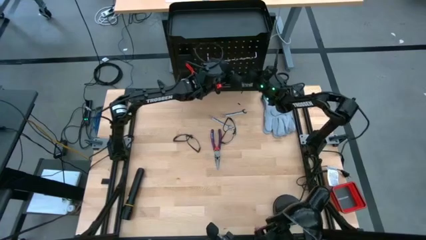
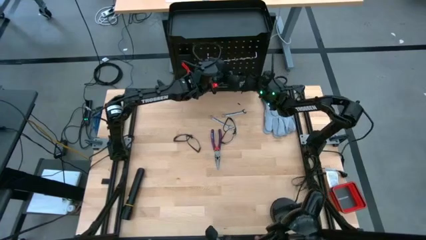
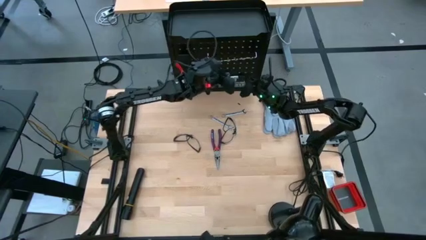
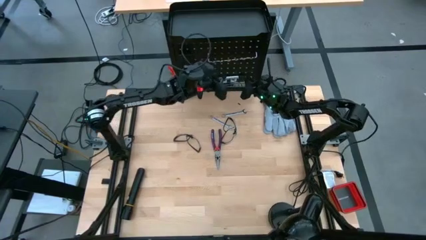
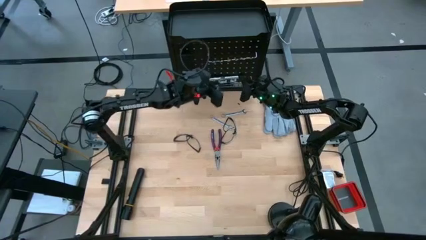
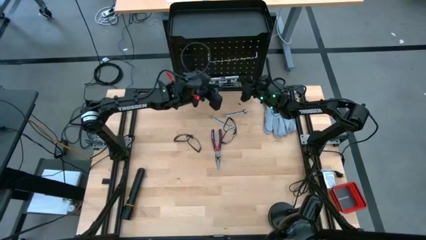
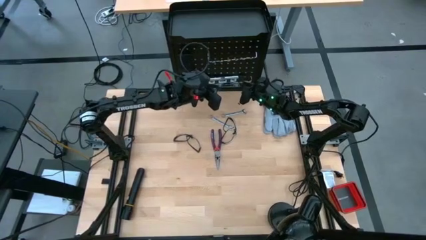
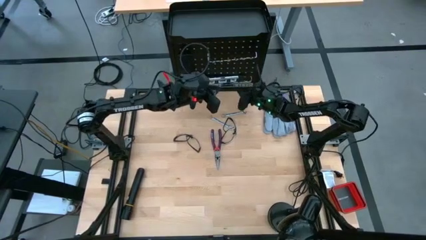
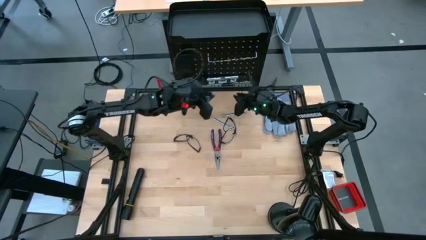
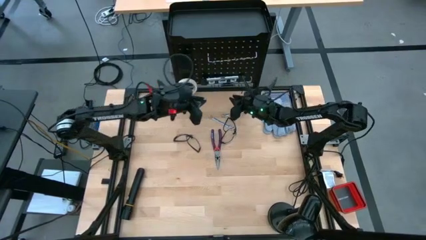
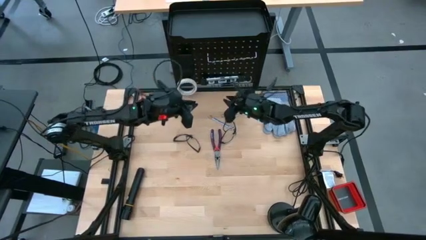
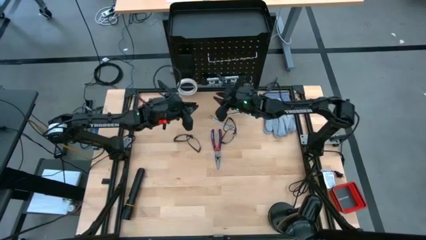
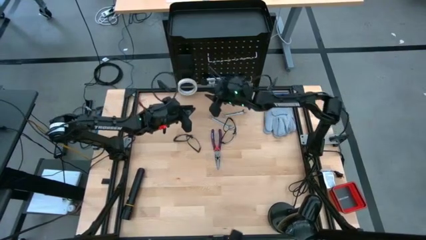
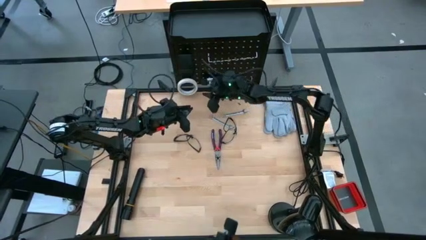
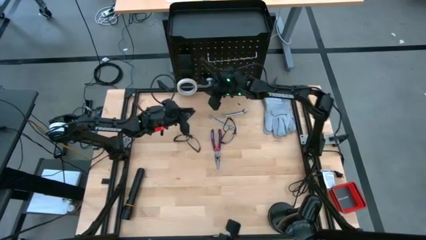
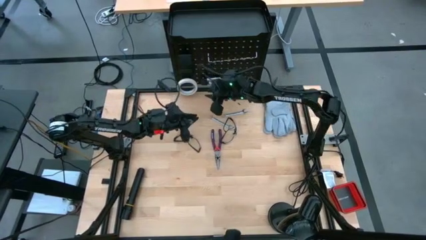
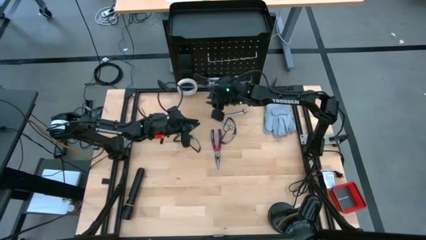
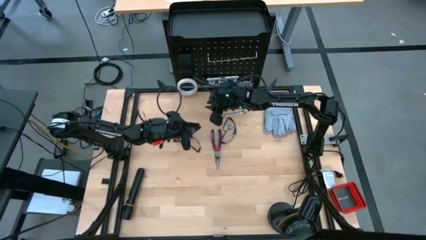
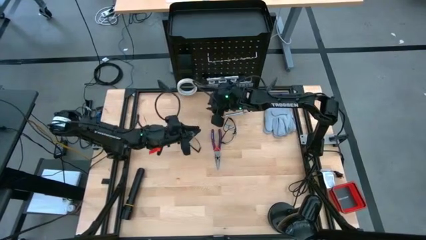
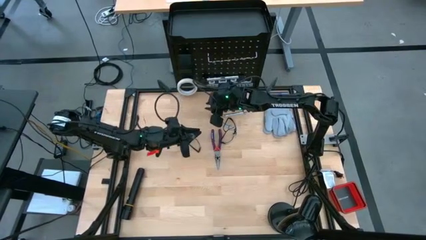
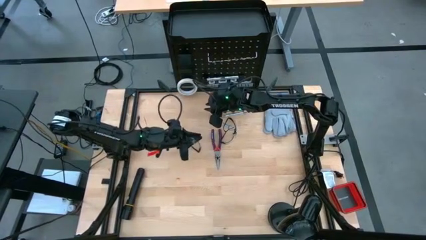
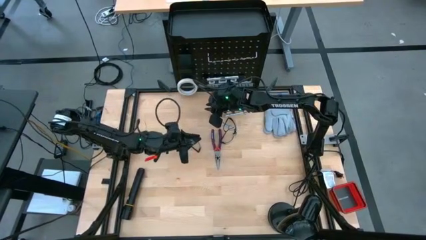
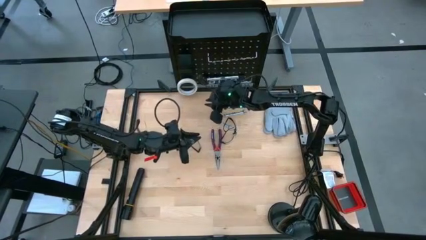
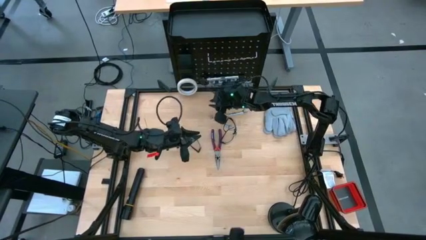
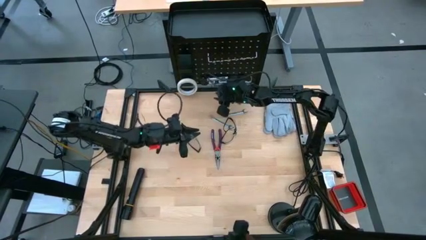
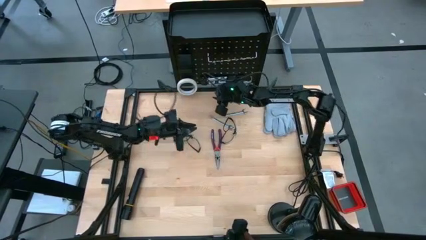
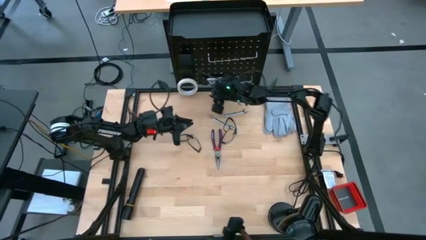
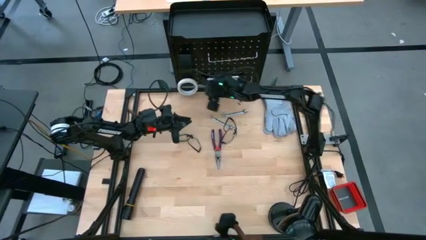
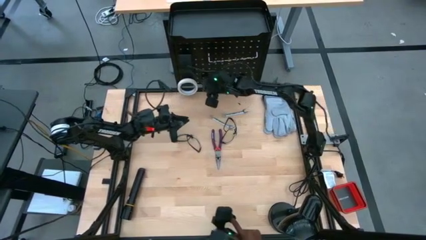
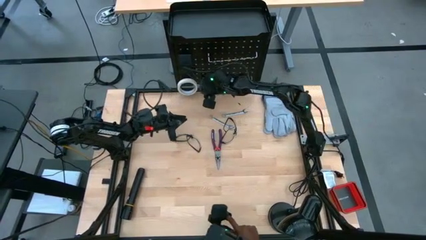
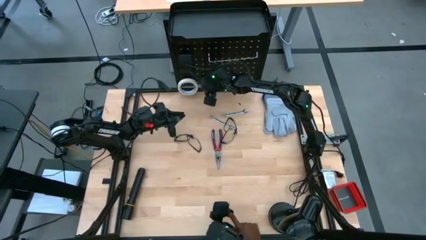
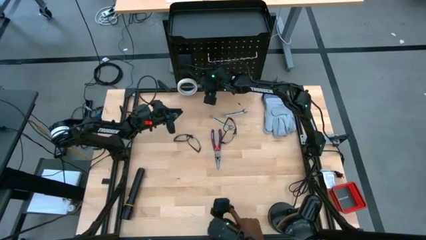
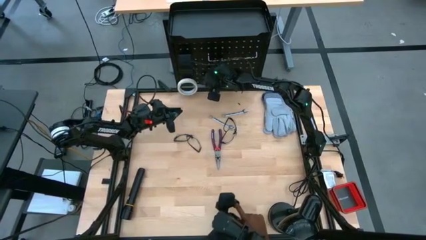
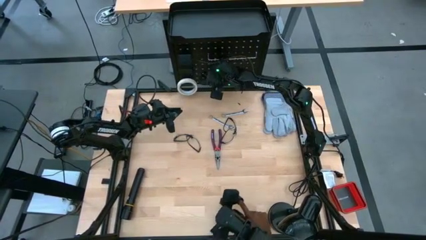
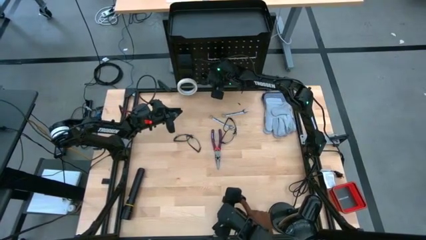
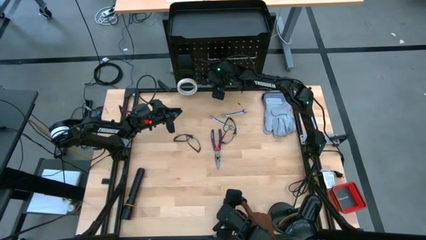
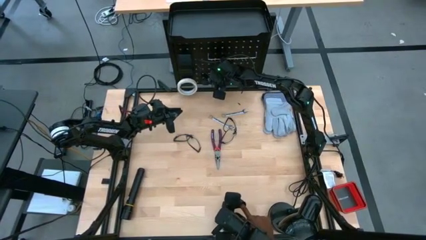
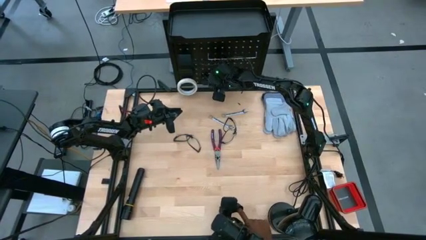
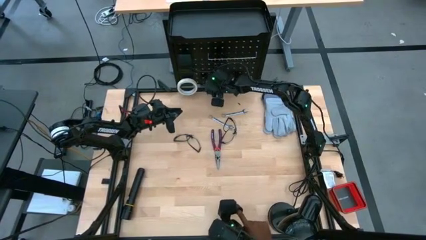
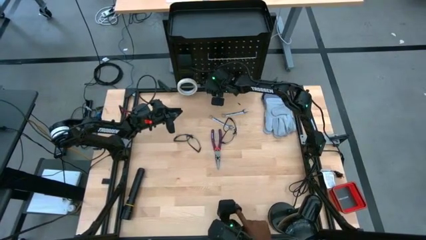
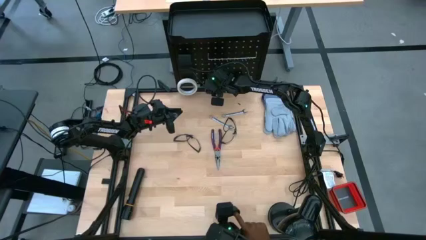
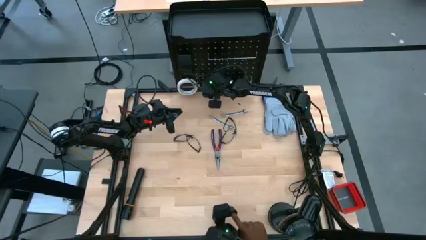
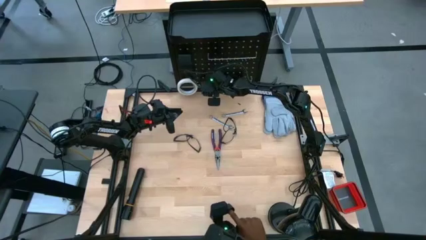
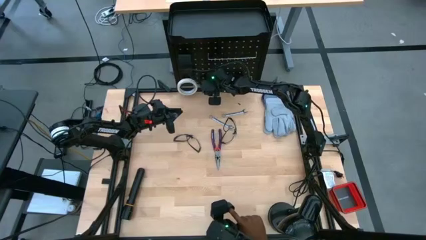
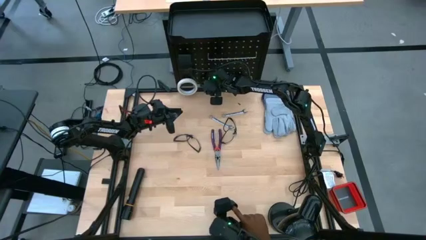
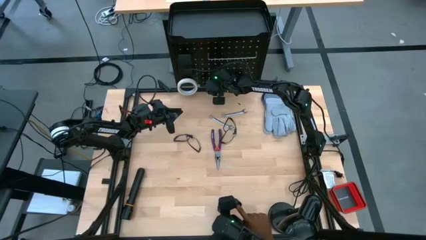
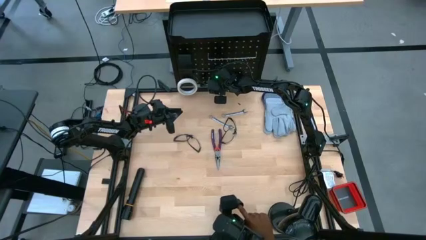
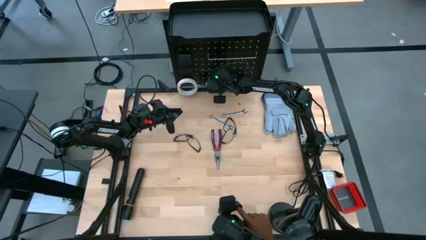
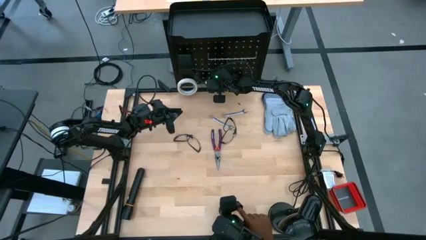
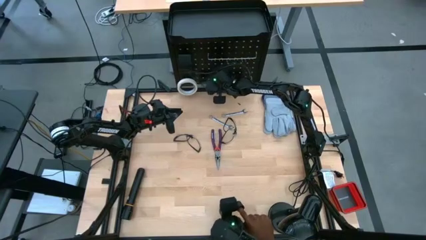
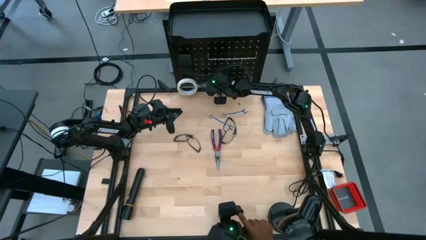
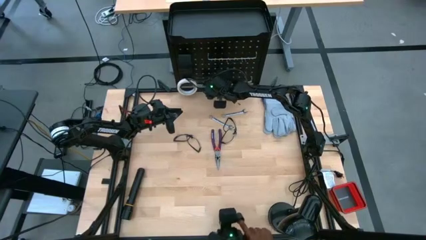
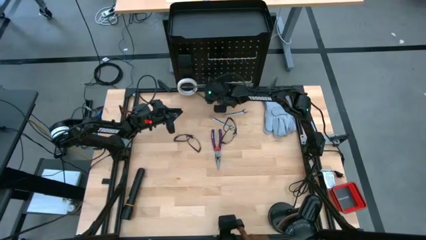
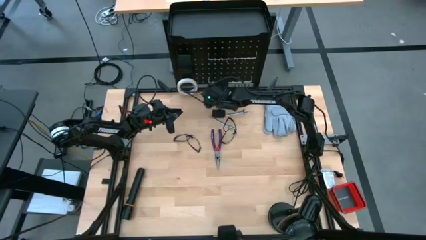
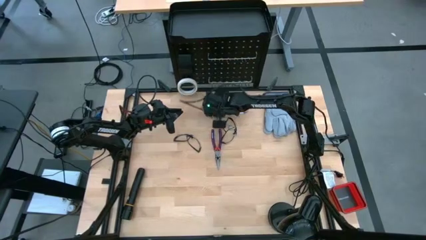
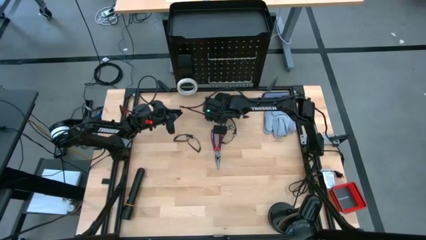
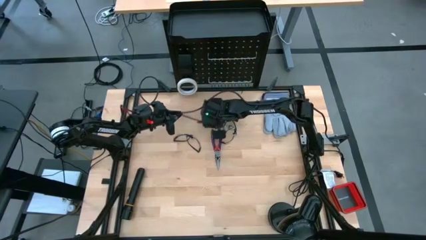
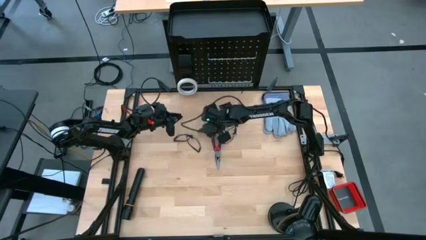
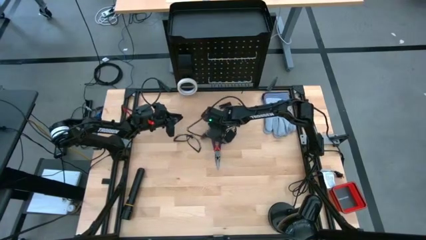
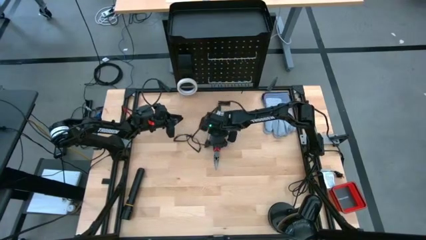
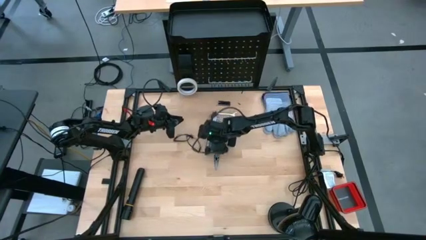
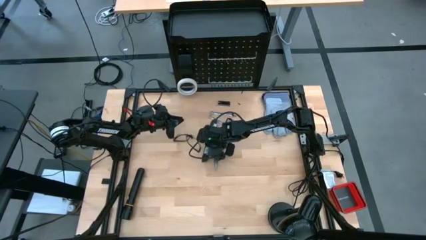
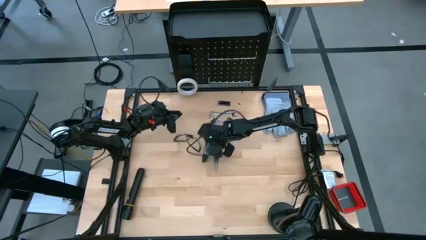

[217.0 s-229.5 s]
Task: Hang tools onto peg board
Remove the black spirit level from the black pegboard

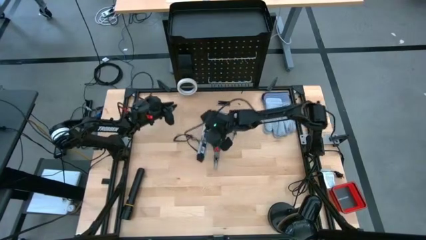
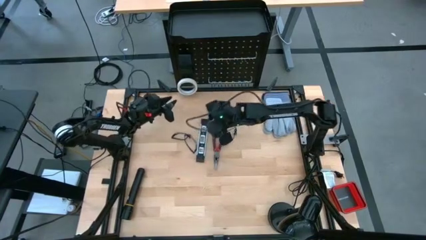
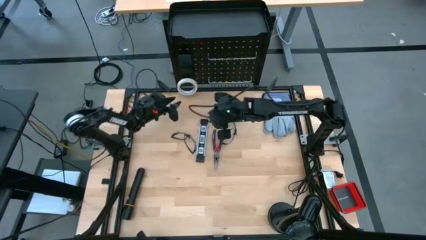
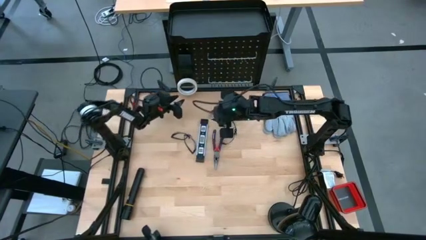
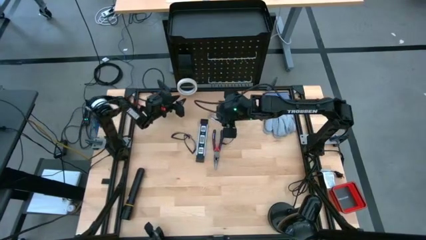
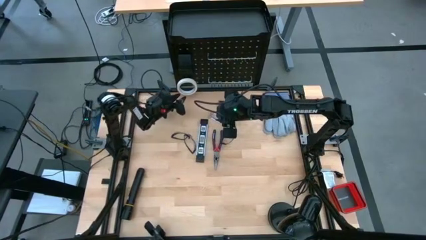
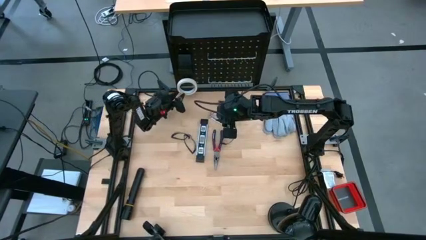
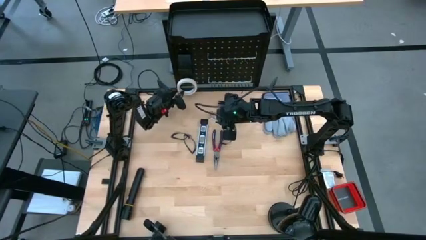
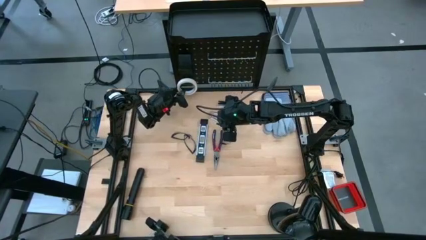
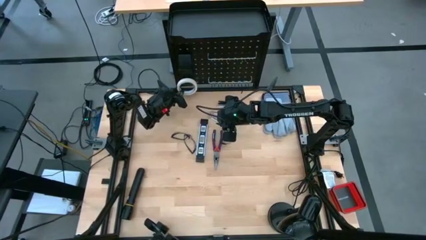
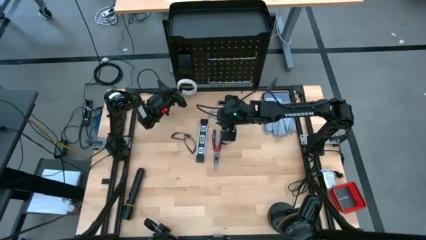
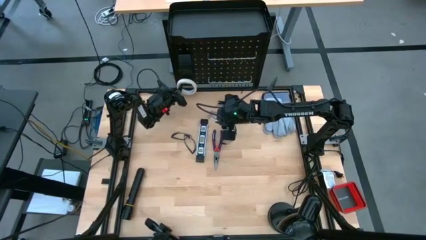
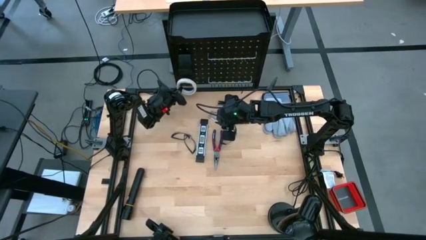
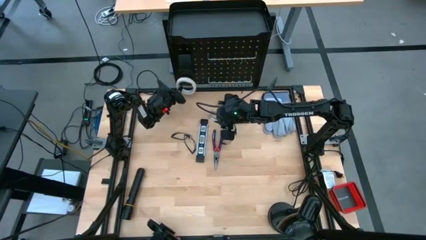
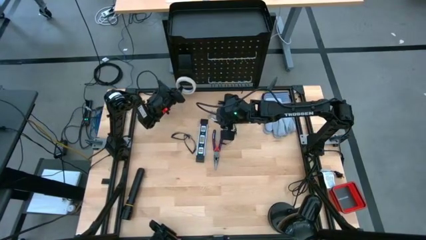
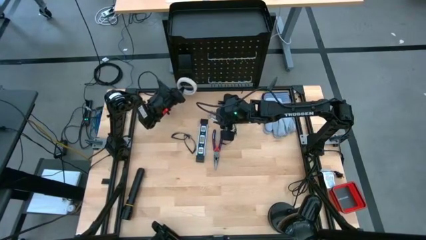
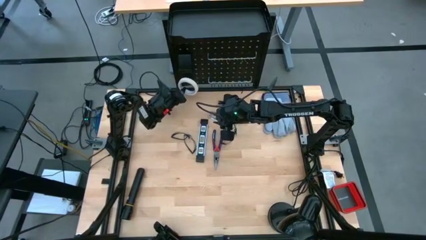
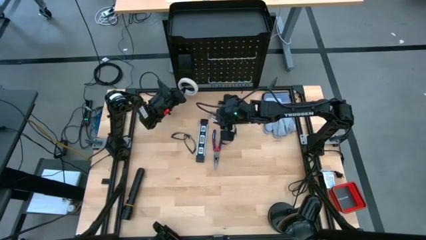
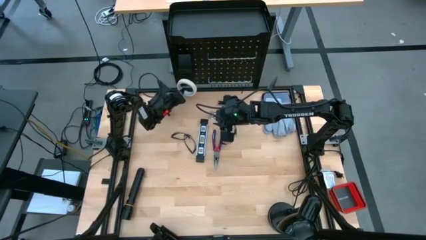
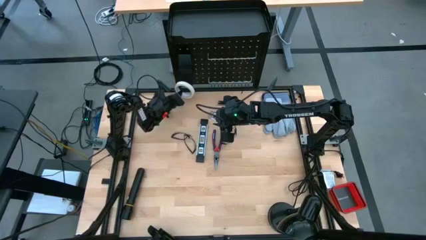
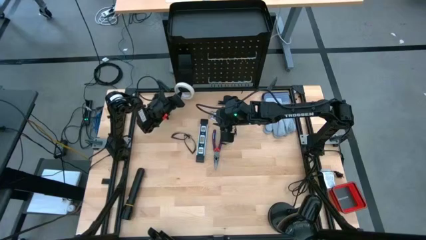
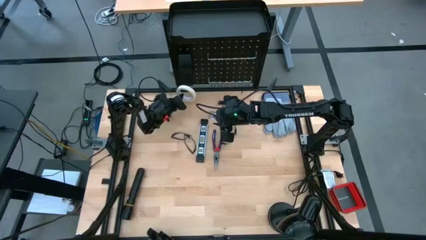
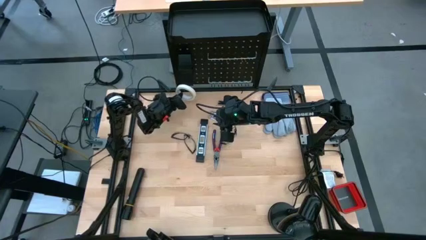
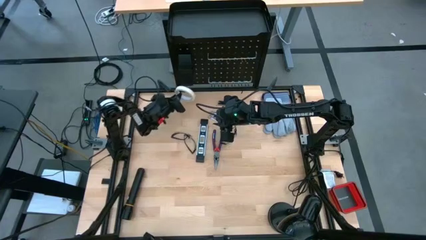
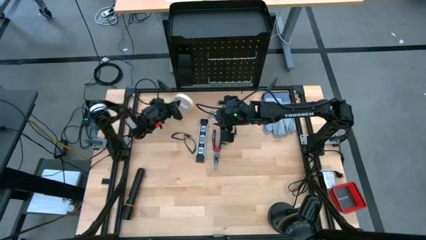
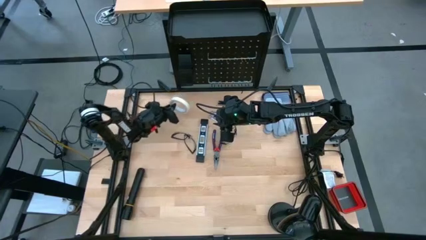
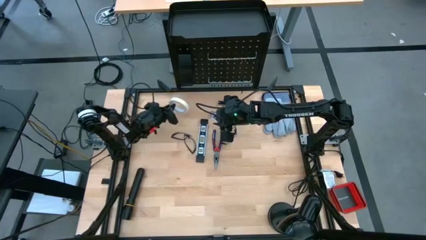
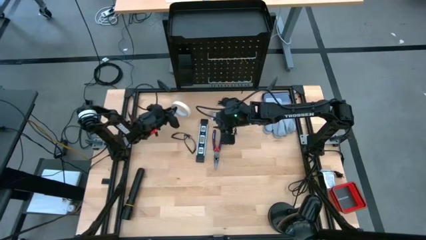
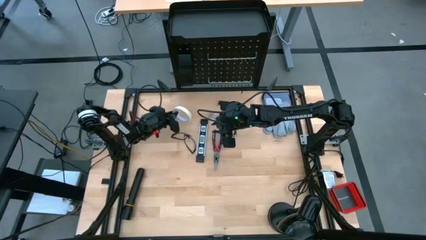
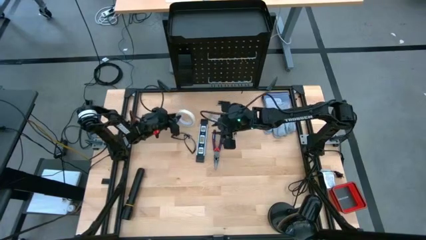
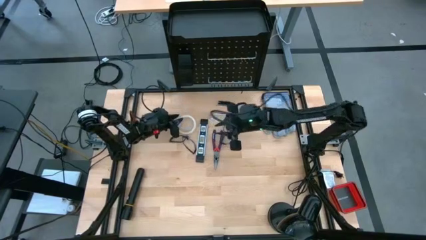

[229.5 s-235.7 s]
Unhang the white tape from the black pegboard
